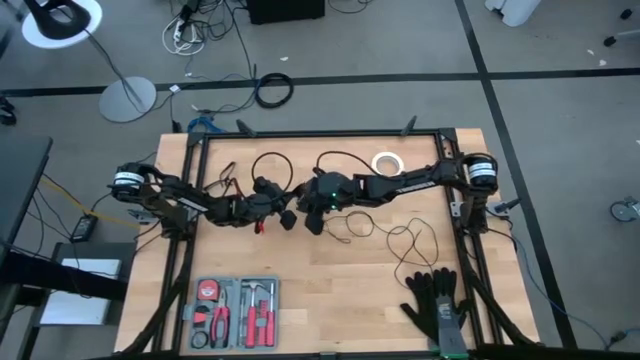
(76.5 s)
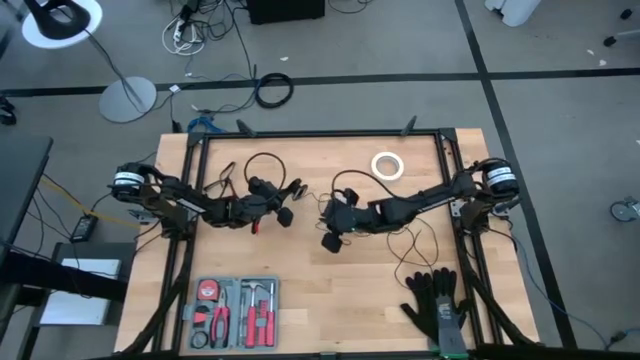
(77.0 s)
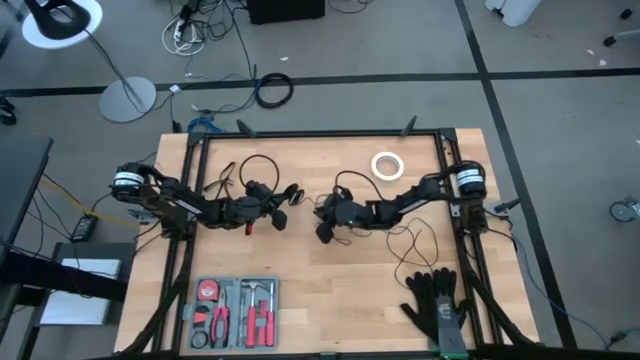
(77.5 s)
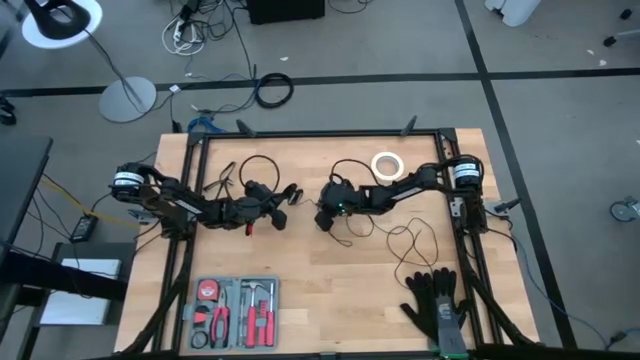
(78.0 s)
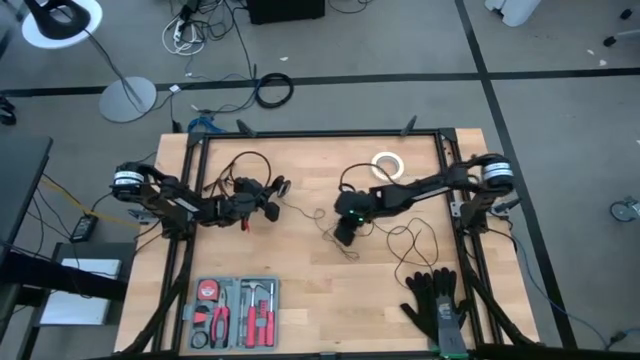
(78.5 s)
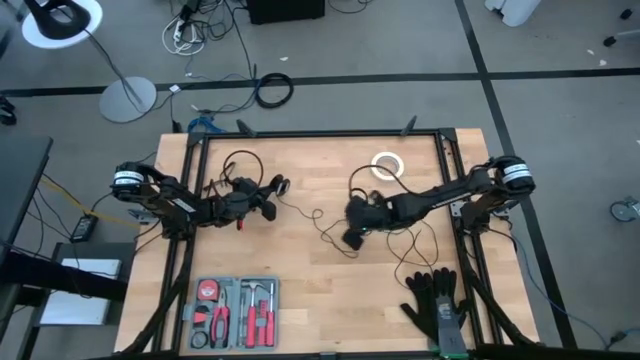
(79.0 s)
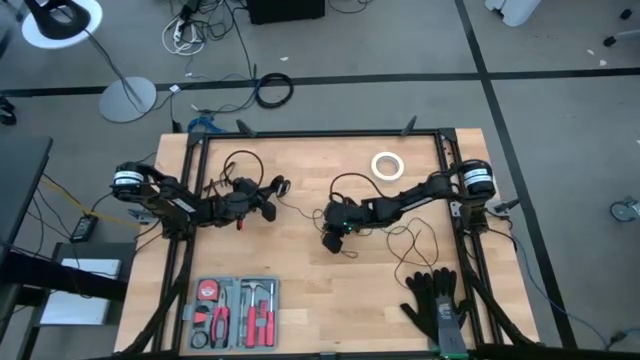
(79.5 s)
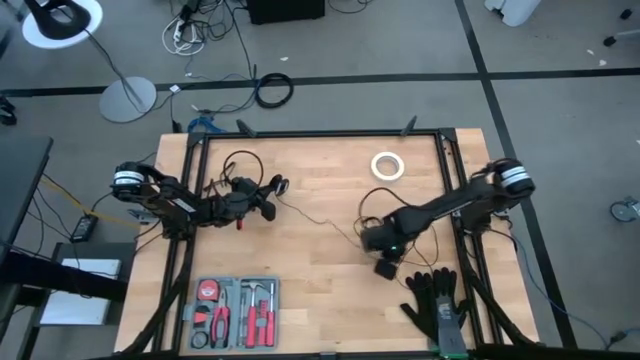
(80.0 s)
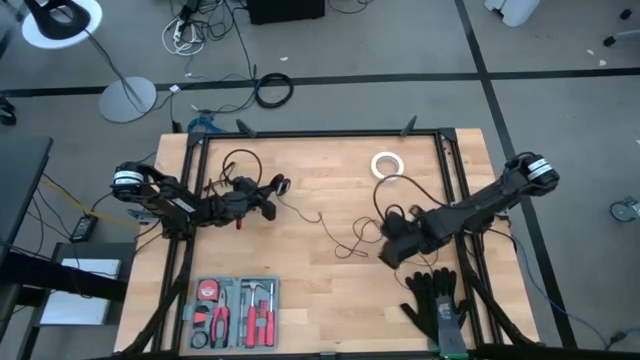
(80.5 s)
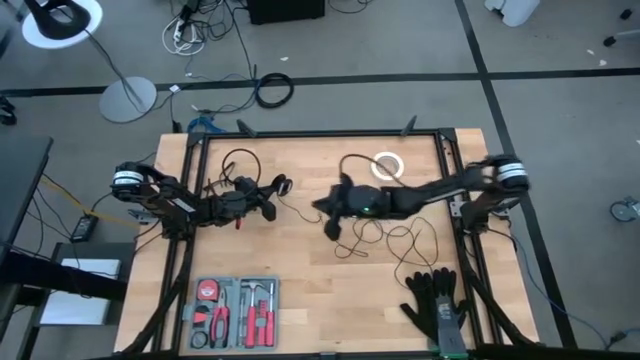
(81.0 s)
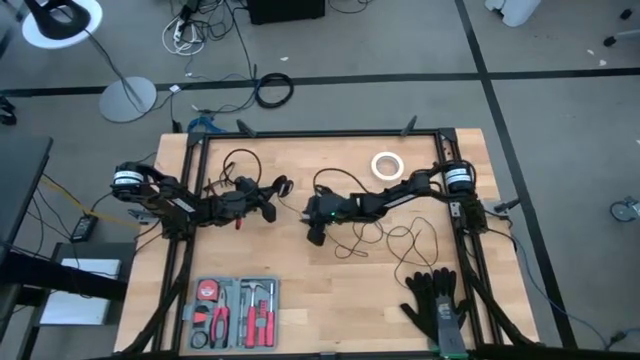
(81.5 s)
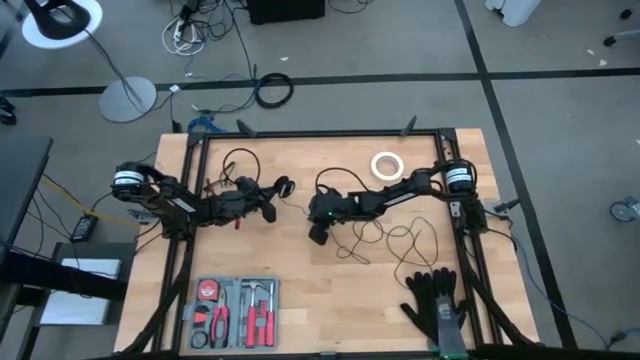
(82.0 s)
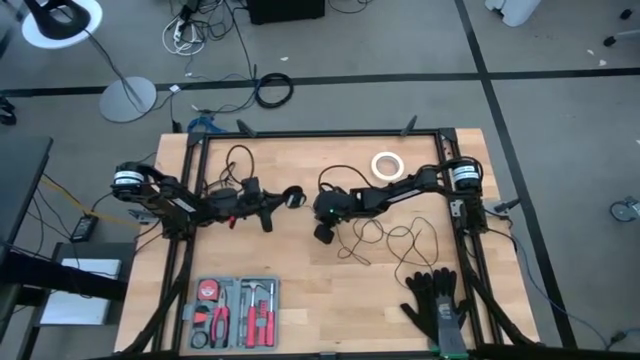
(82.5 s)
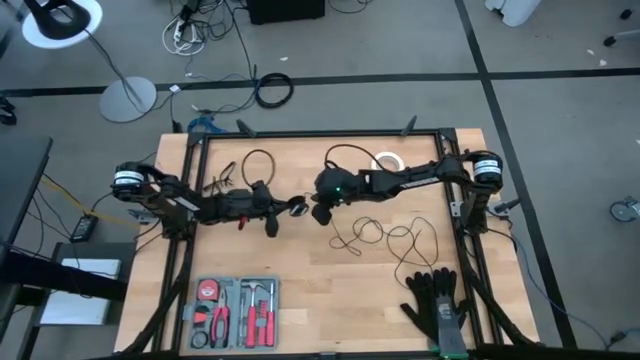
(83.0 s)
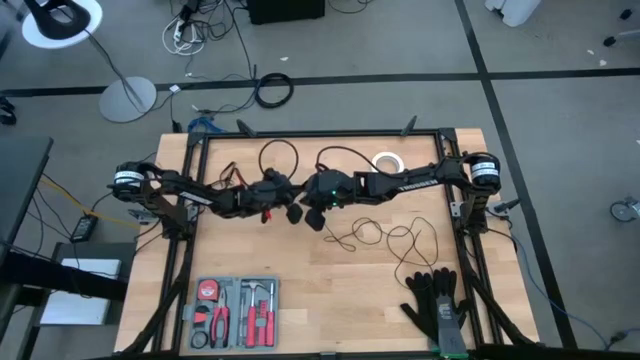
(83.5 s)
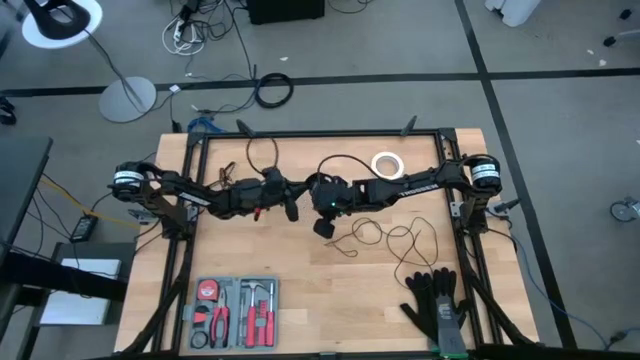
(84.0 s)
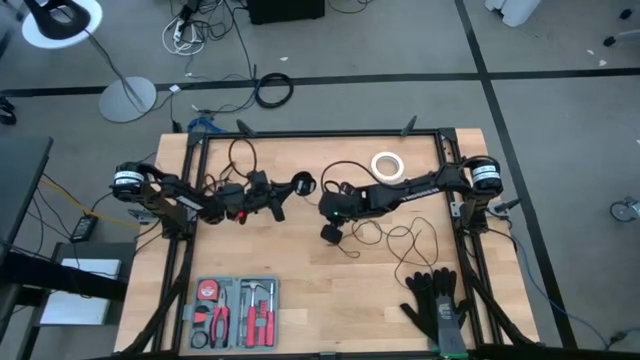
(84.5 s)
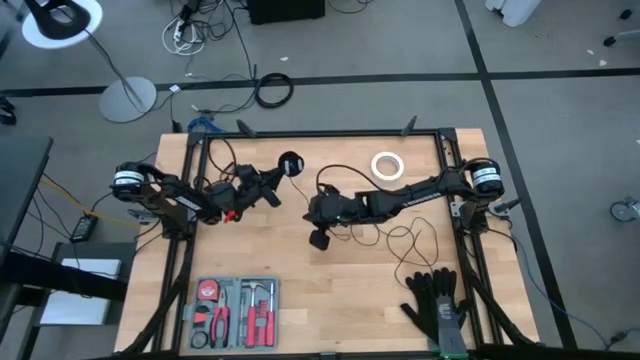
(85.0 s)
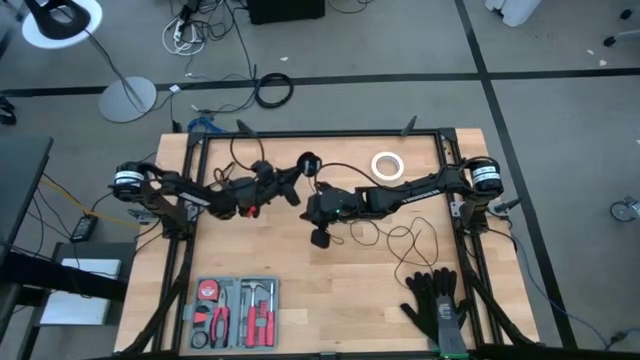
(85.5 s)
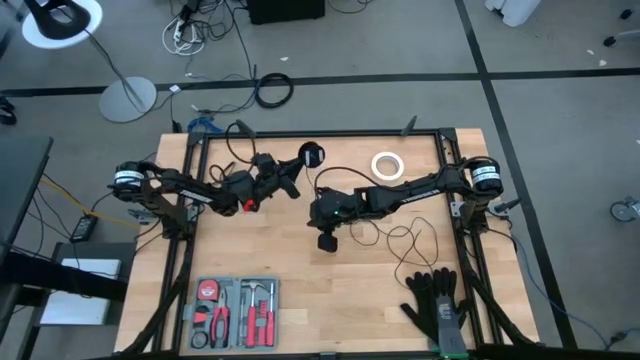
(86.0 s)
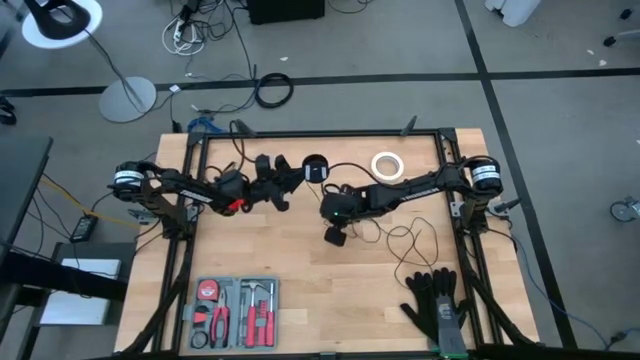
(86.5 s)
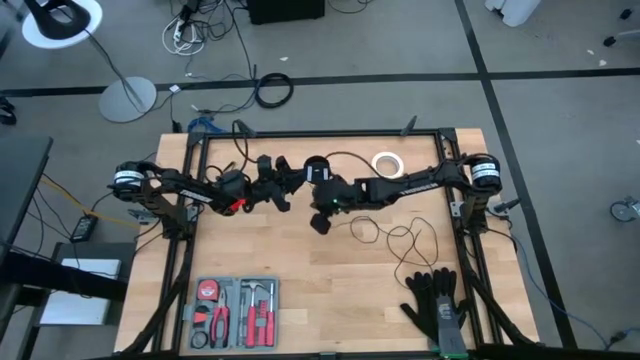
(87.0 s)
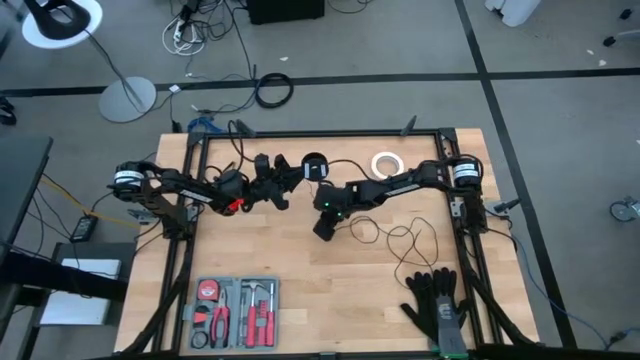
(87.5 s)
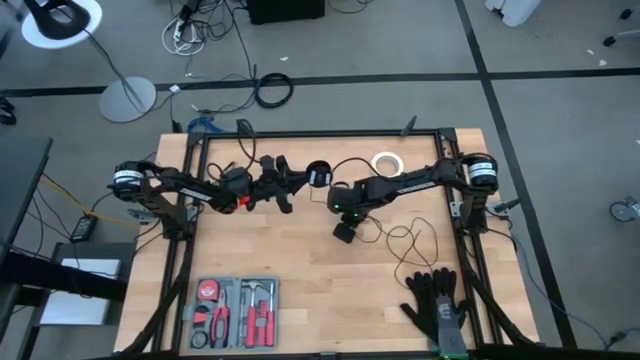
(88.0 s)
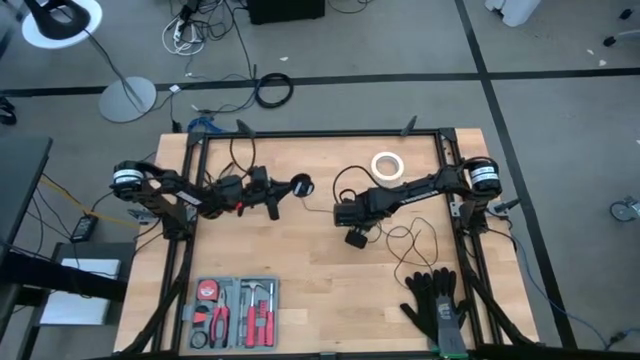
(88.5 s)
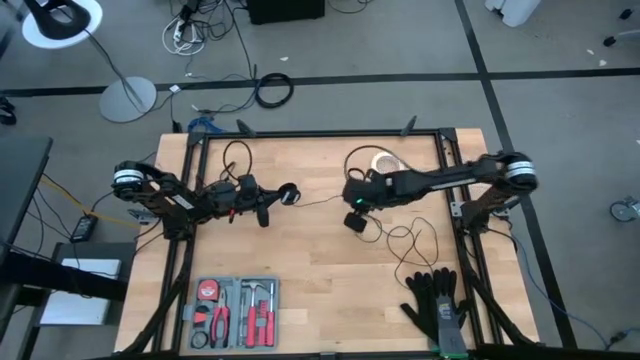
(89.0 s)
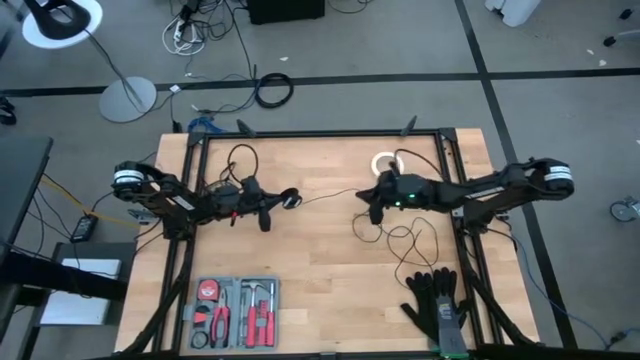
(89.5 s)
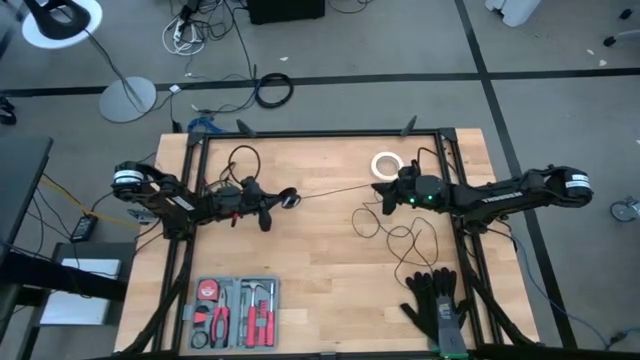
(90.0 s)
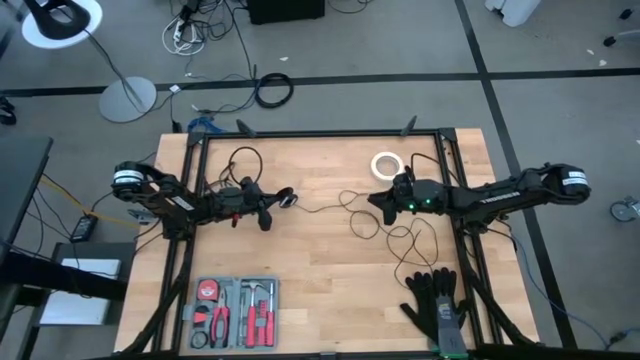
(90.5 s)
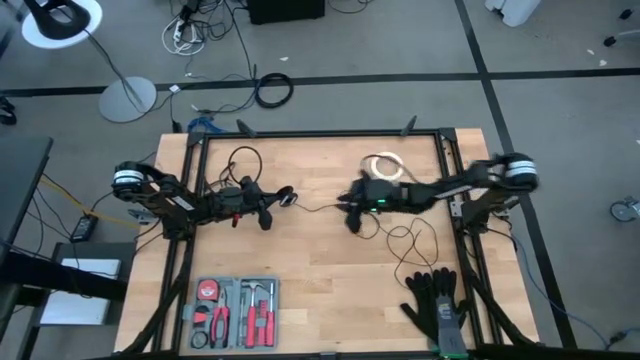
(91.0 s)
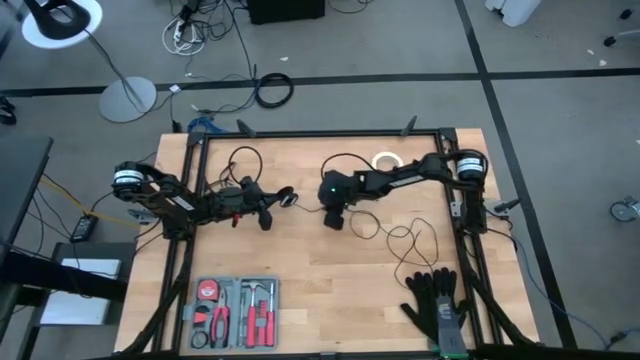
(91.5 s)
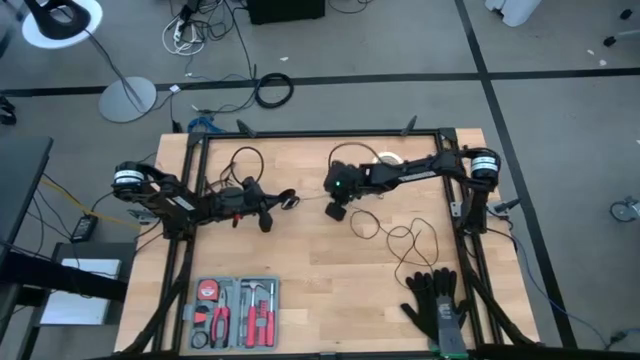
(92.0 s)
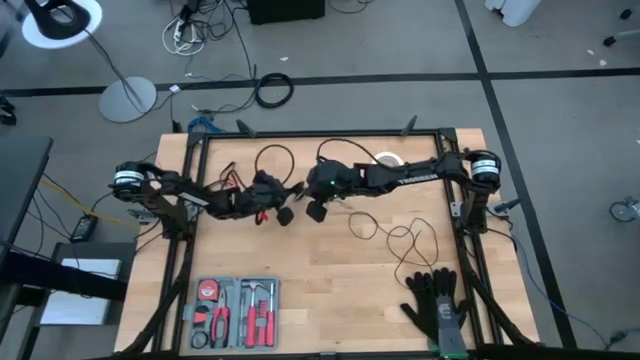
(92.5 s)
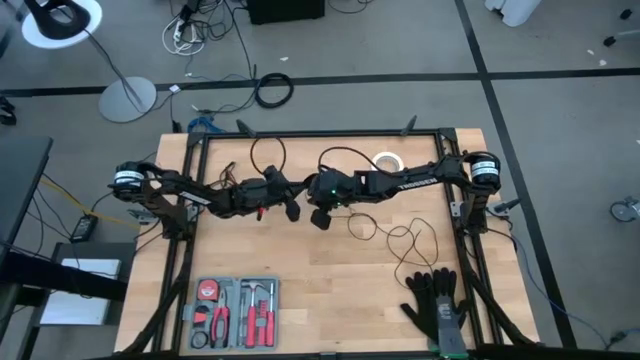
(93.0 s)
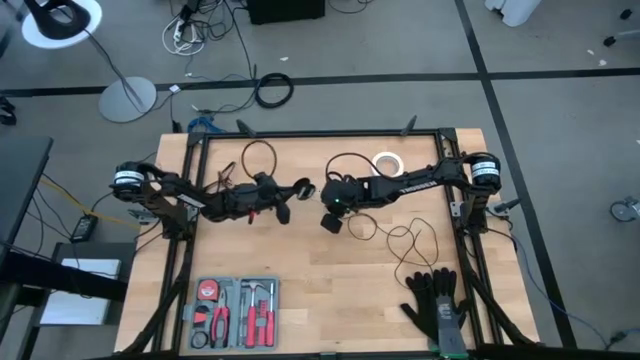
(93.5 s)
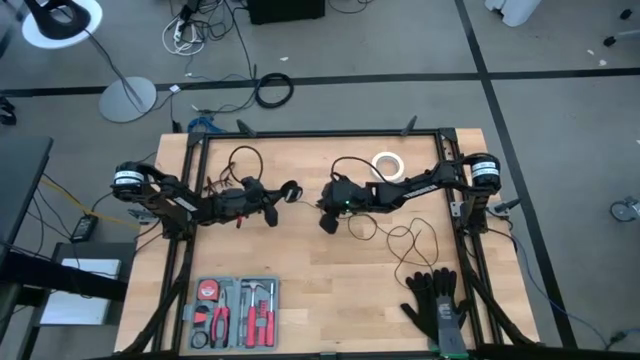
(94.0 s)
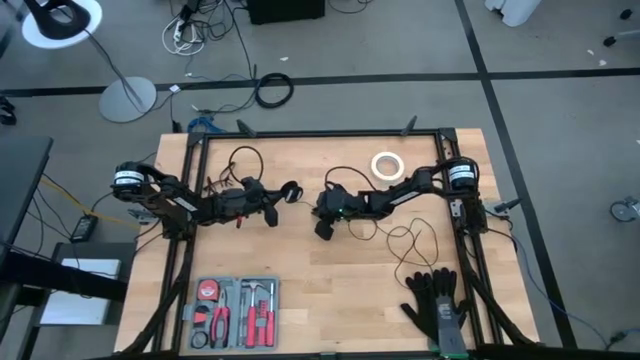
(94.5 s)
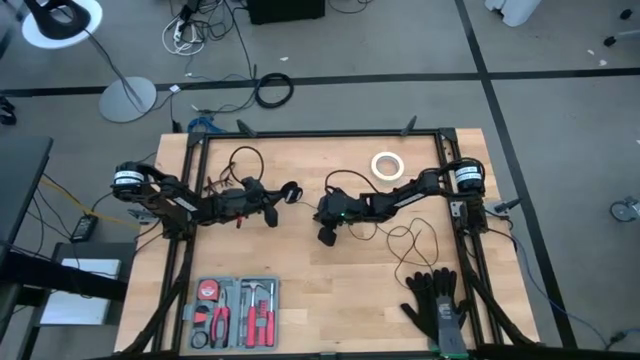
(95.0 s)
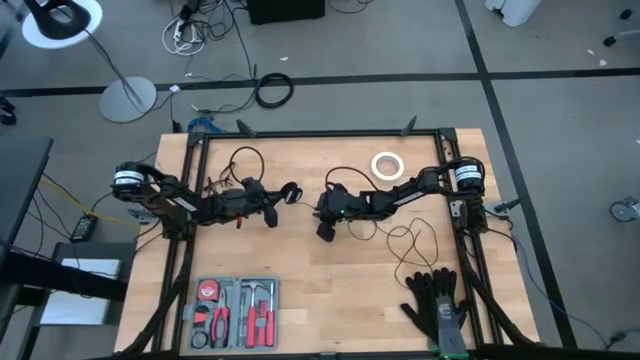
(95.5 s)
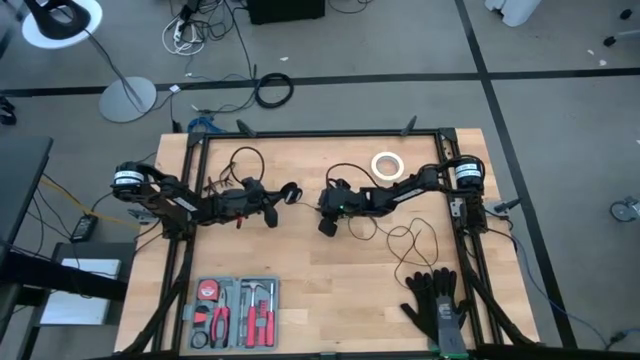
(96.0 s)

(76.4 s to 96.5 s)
Task: Coil cords
Coil the black wire on the black spool

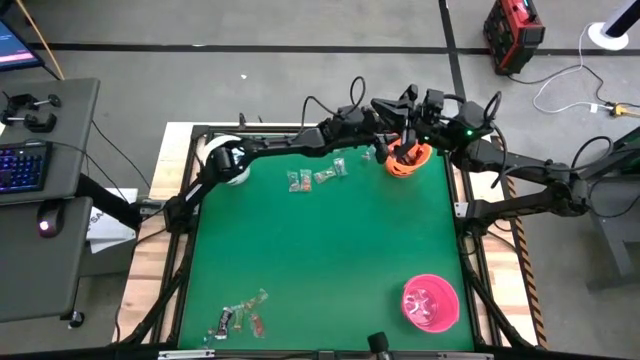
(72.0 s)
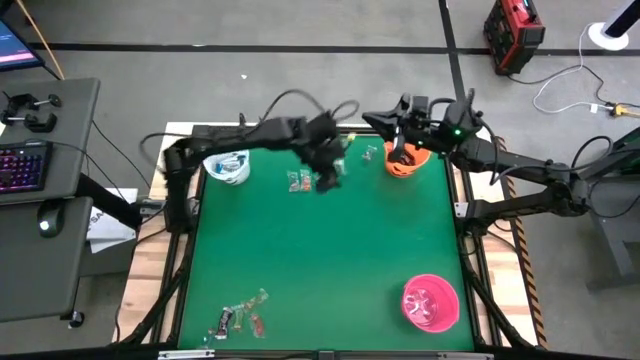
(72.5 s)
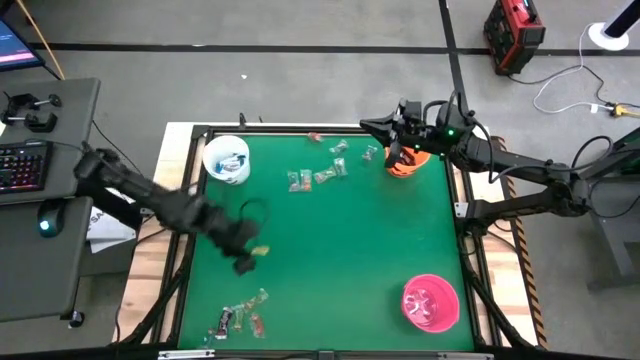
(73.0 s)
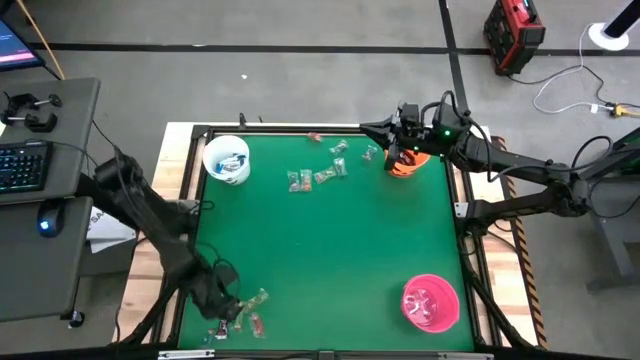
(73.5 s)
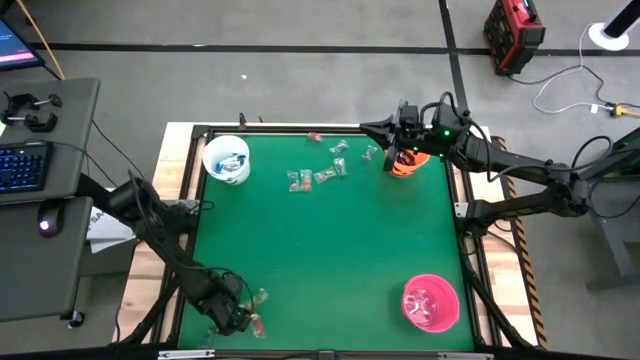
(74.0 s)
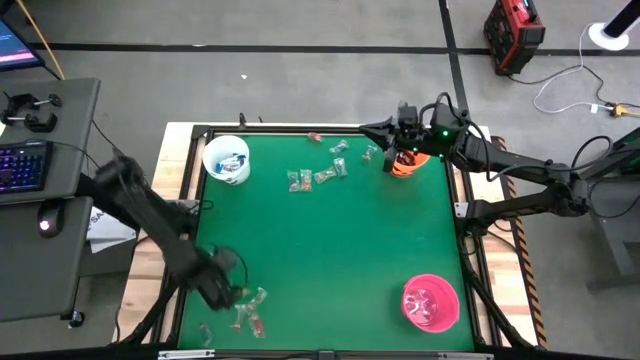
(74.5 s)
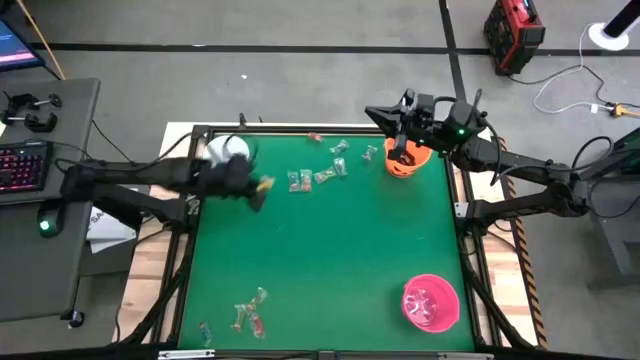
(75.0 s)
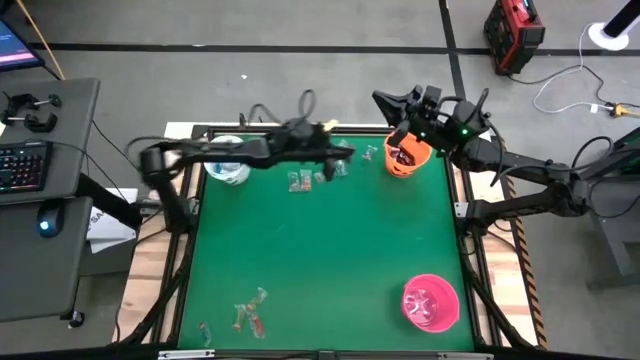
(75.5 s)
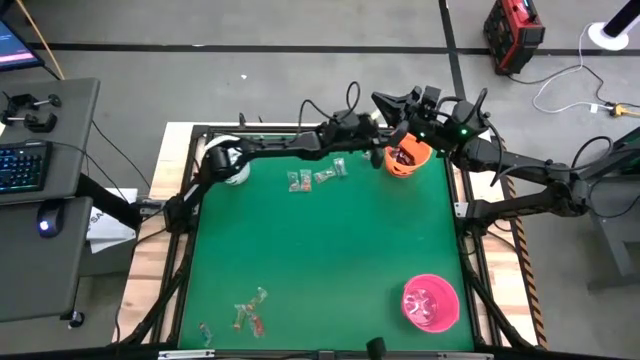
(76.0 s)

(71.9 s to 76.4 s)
Task: Sort candy by brand, put in halloween buckets
Put the brown chocolate bar into the orange bucket
